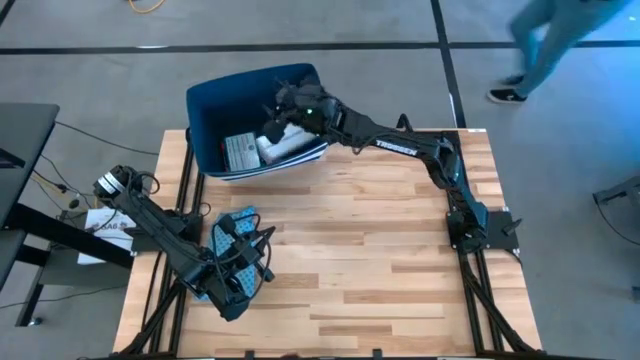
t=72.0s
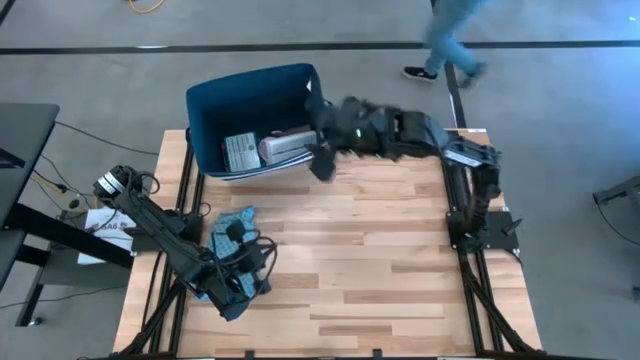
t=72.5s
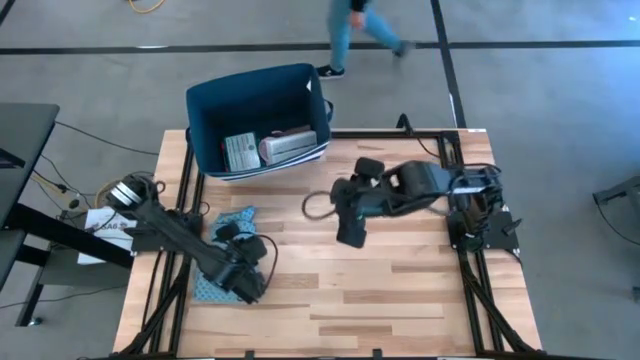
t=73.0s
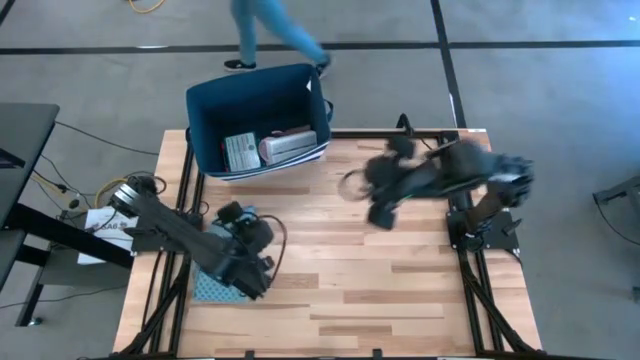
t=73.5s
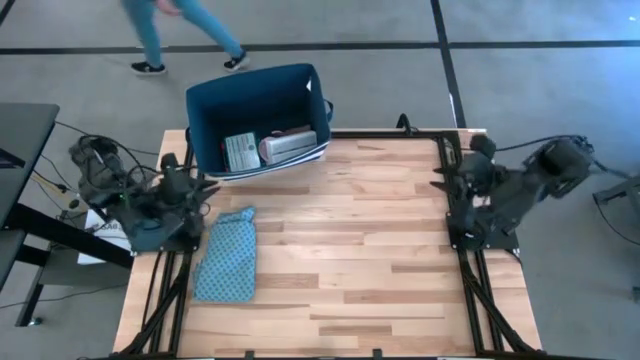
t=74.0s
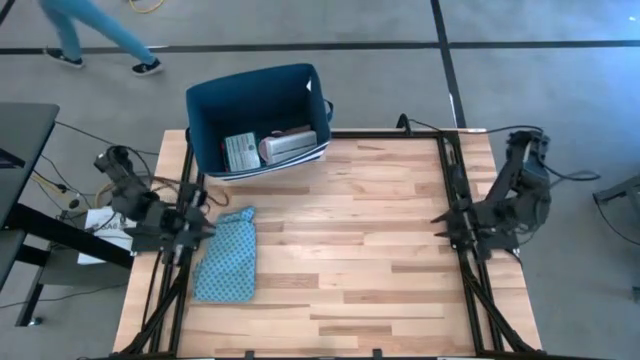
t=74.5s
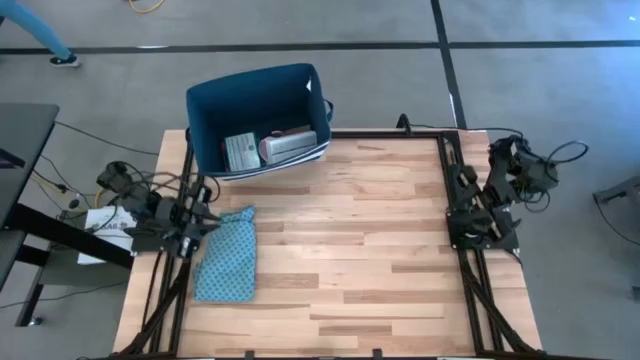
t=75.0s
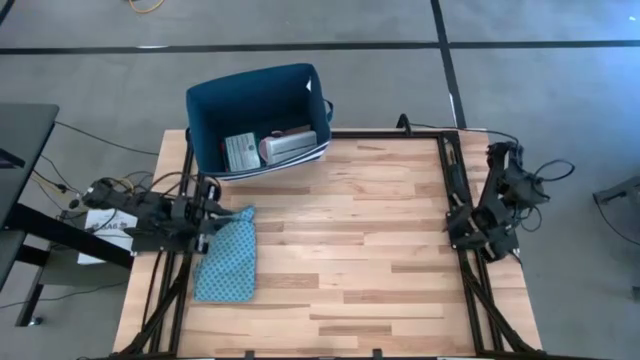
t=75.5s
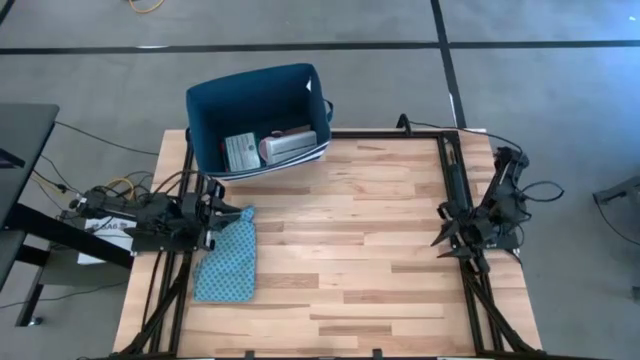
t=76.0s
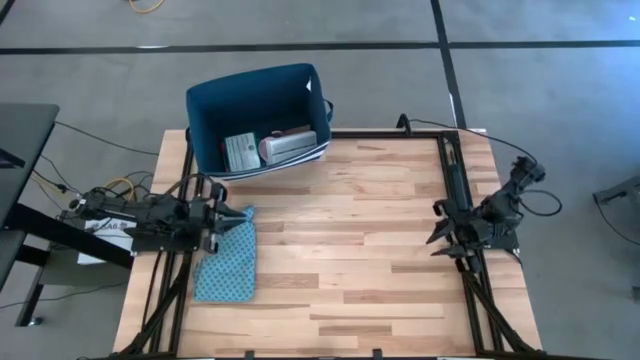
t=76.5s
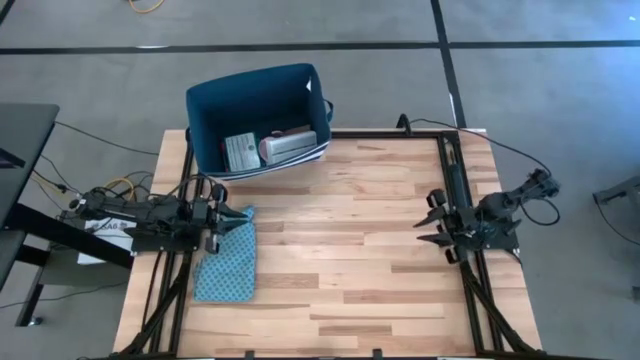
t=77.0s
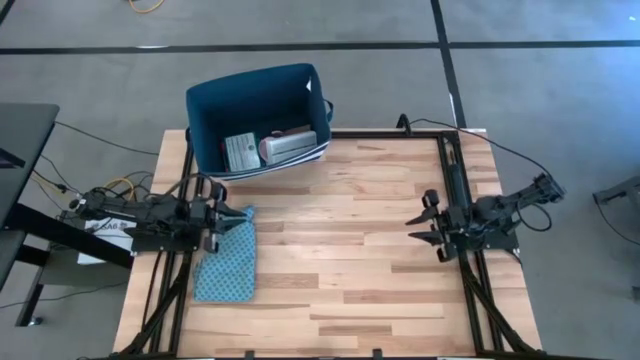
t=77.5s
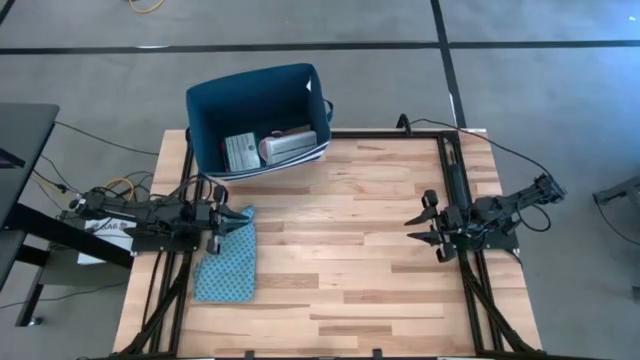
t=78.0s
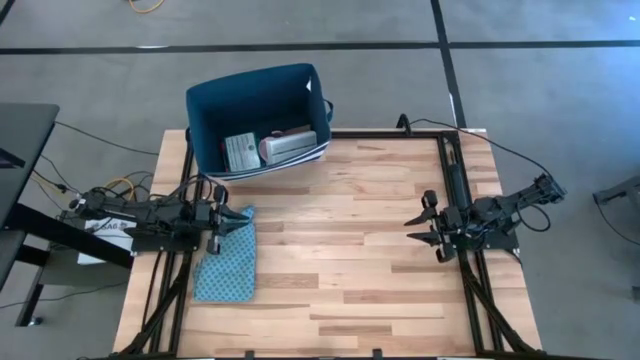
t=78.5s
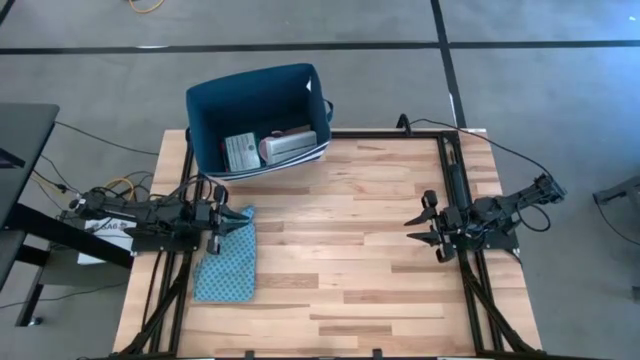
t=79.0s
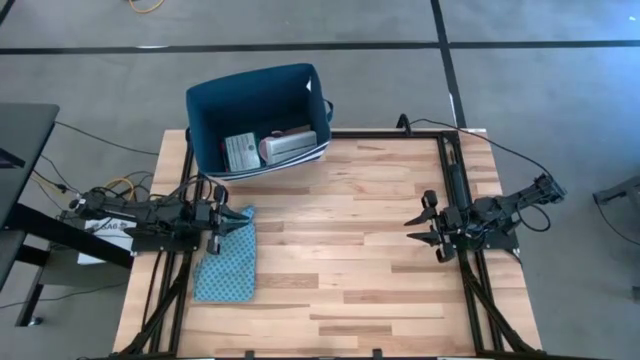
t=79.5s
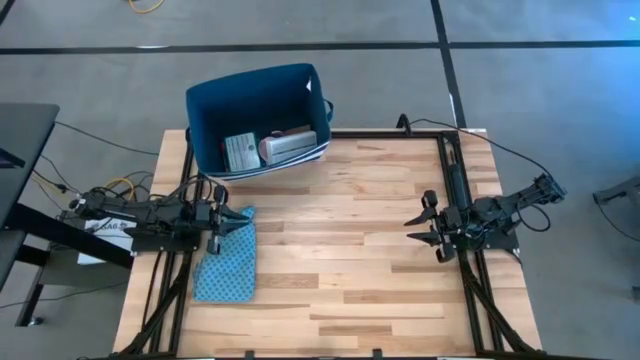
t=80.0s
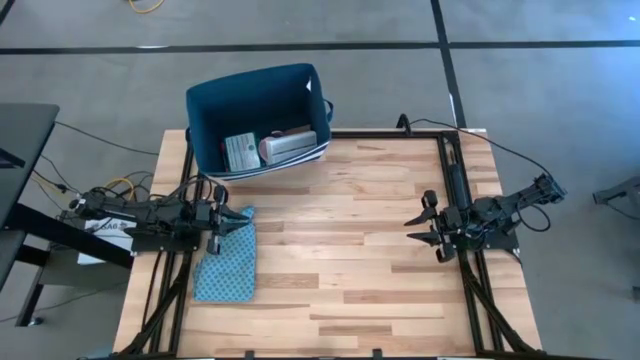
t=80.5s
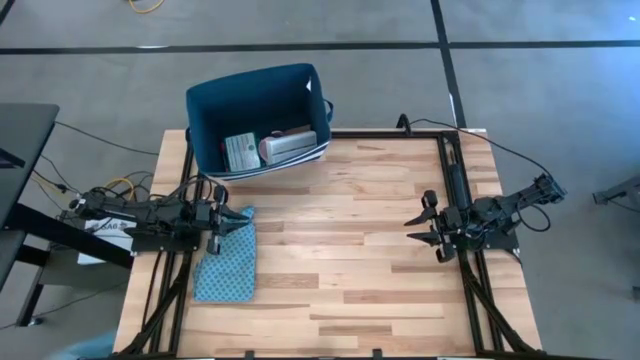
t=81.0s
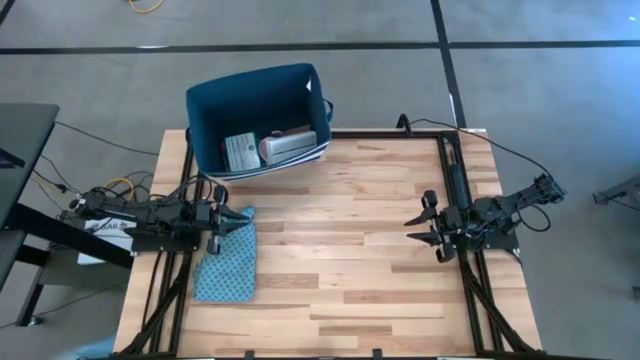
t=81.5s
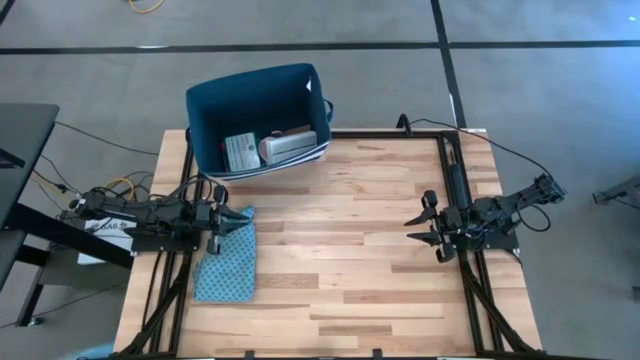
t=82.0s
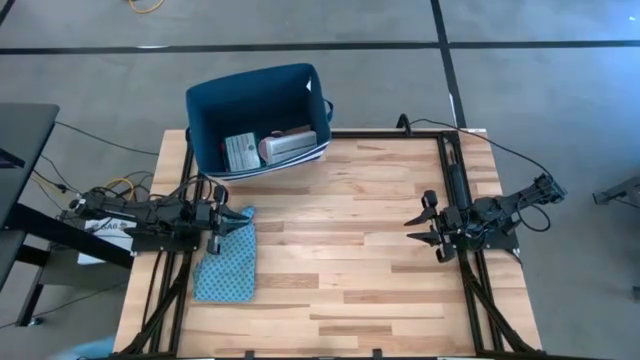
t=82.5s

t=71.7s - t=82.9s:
Task: Pick & place medical supplies in basket/bin
Return to Home Position

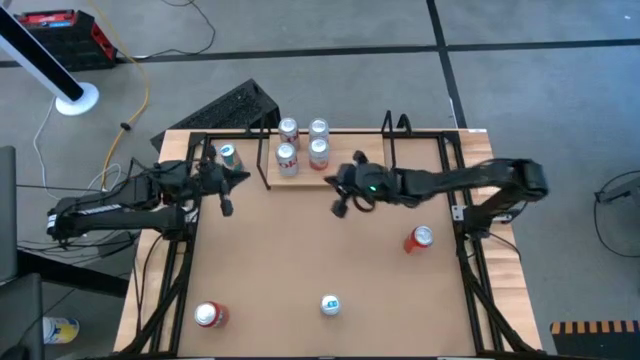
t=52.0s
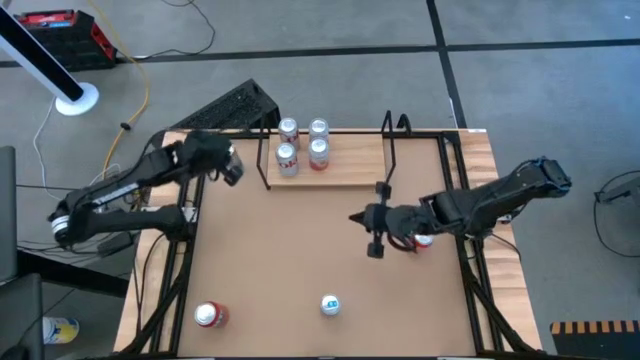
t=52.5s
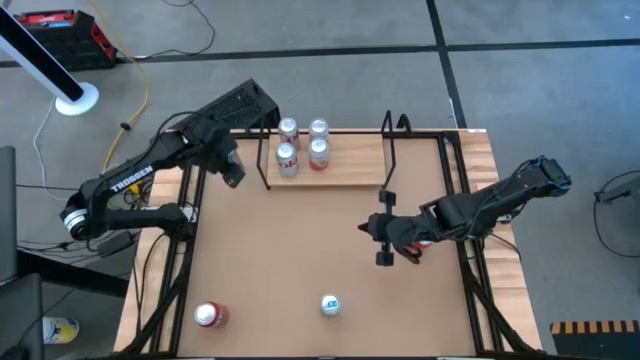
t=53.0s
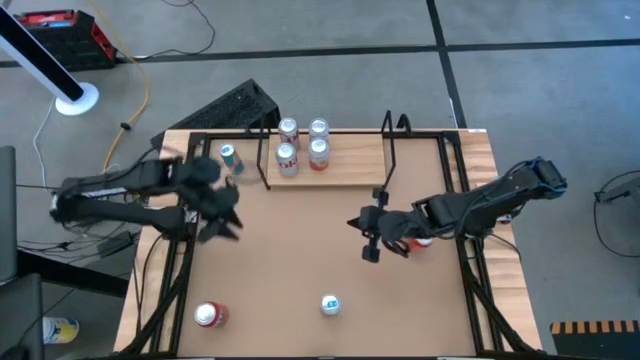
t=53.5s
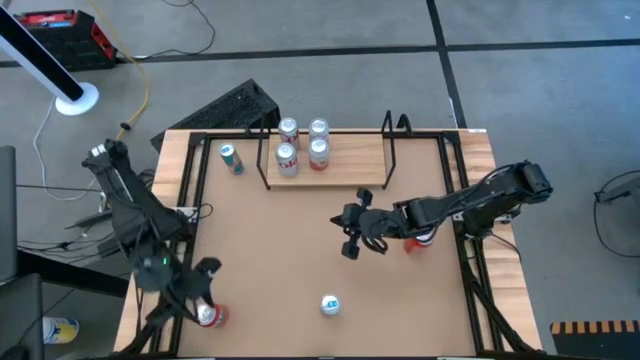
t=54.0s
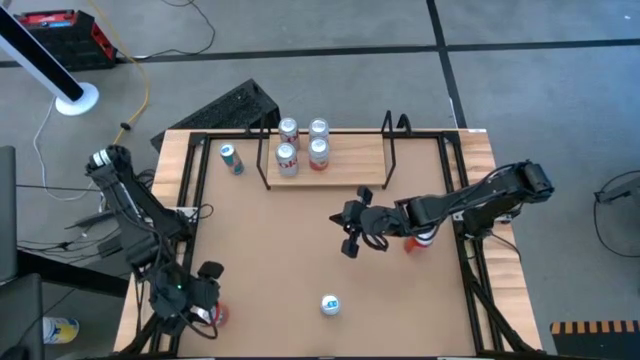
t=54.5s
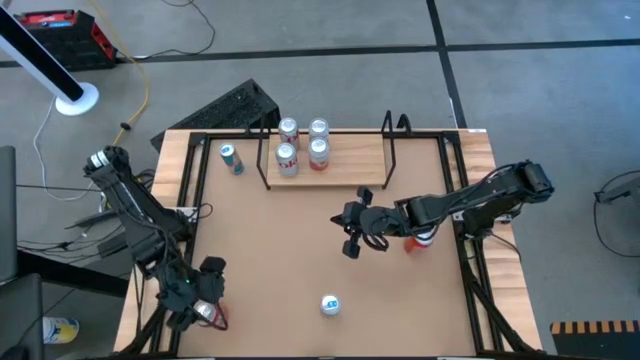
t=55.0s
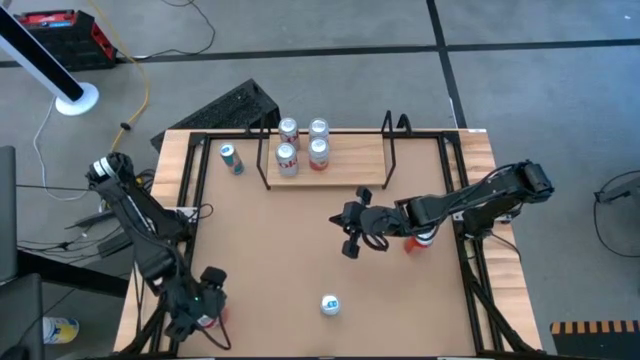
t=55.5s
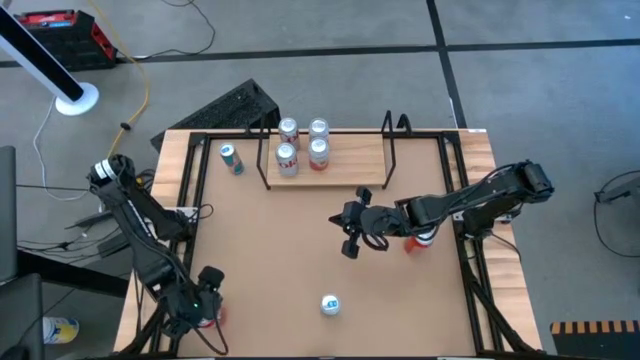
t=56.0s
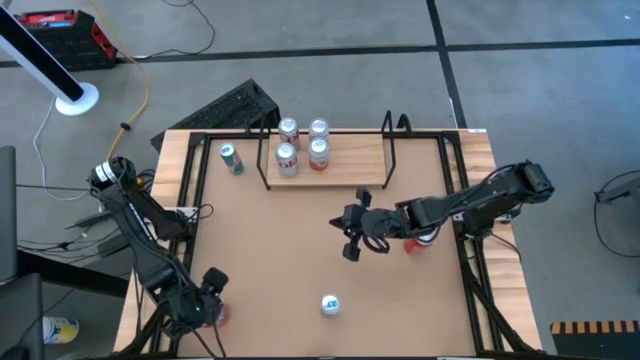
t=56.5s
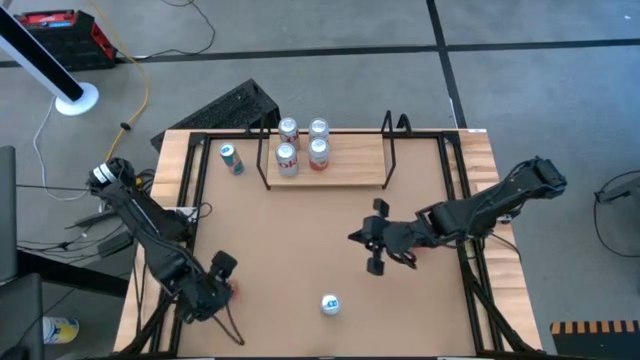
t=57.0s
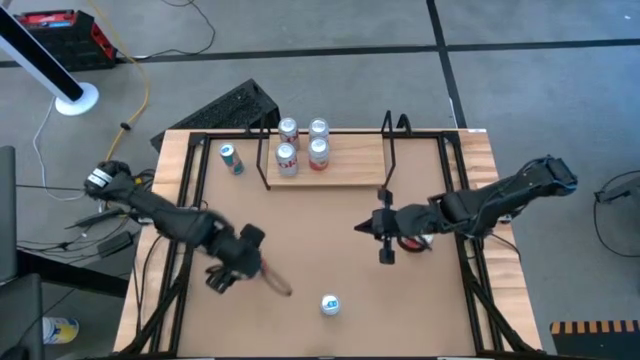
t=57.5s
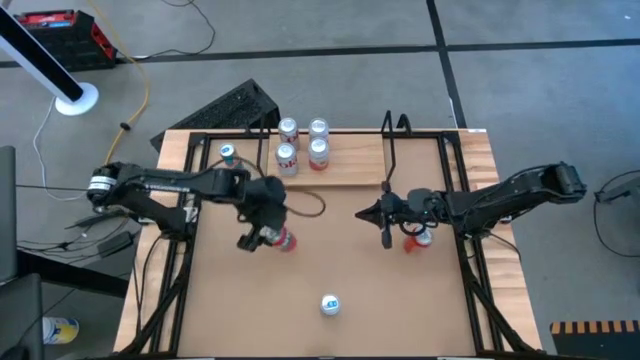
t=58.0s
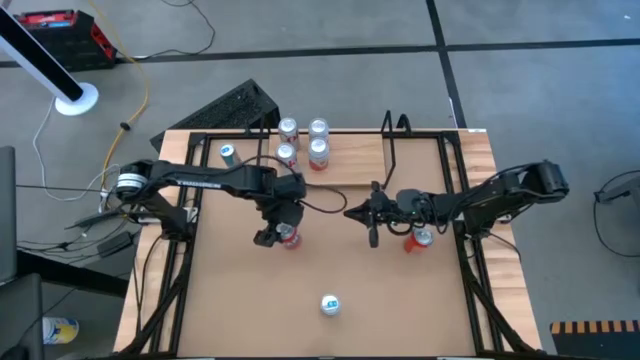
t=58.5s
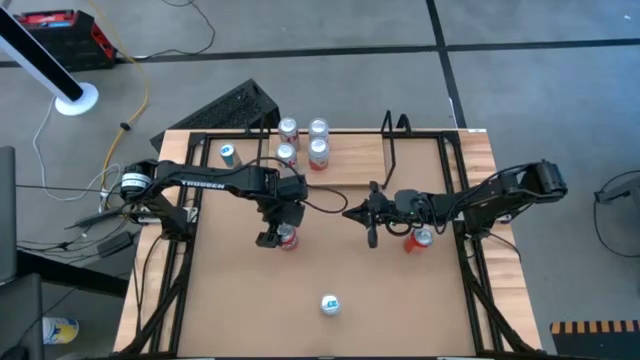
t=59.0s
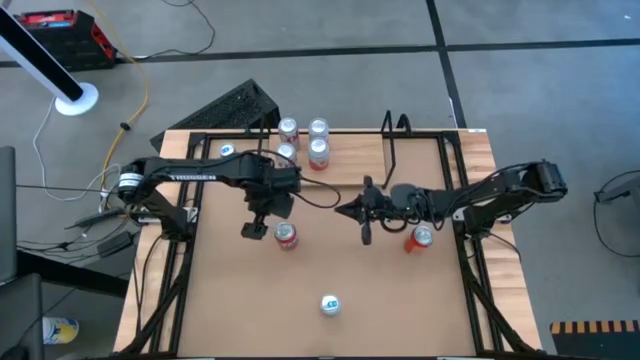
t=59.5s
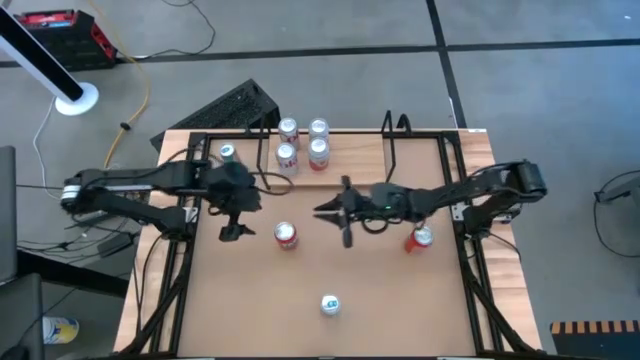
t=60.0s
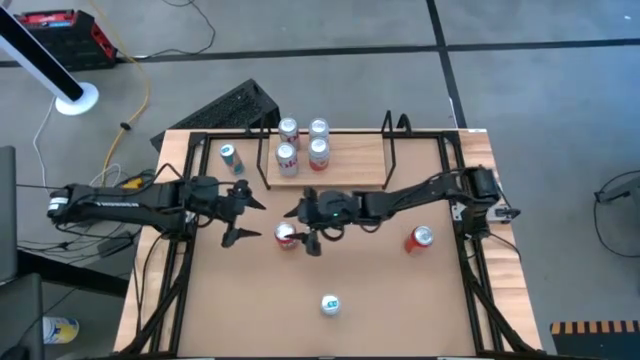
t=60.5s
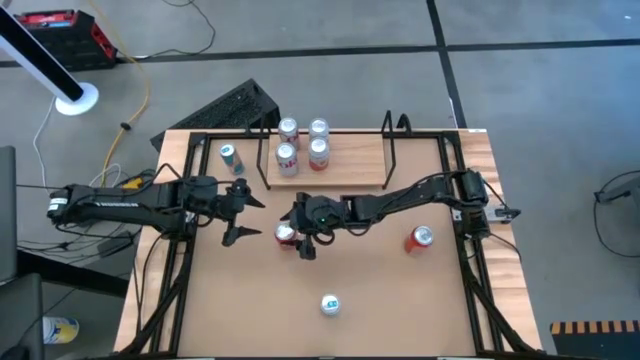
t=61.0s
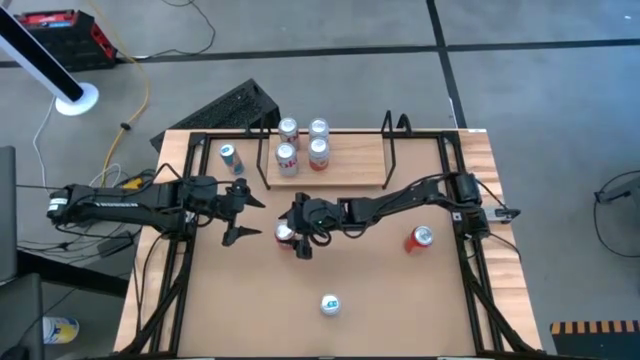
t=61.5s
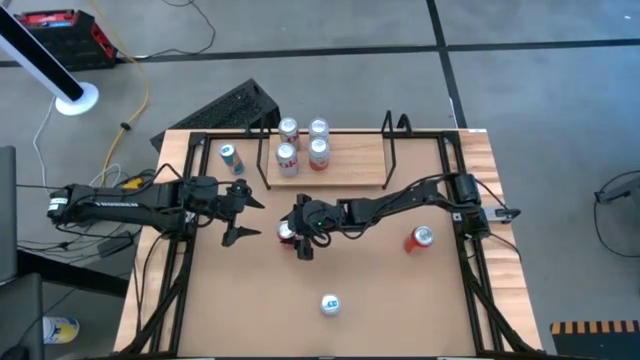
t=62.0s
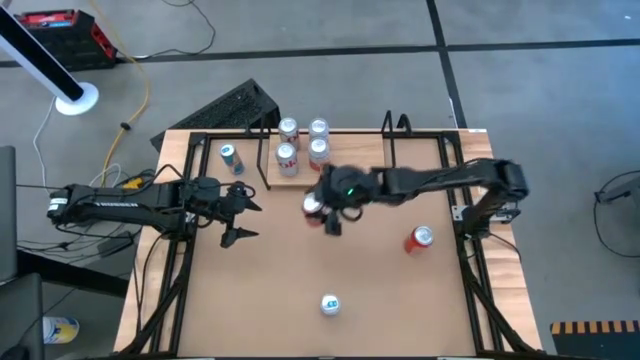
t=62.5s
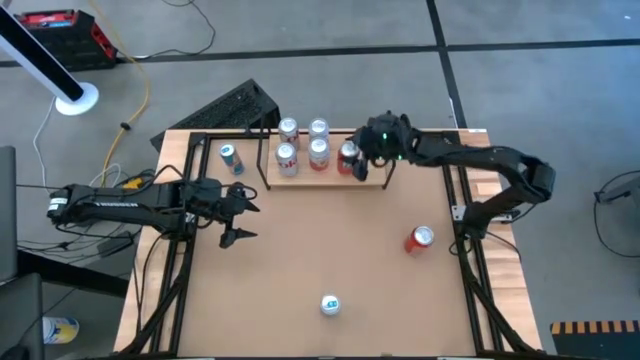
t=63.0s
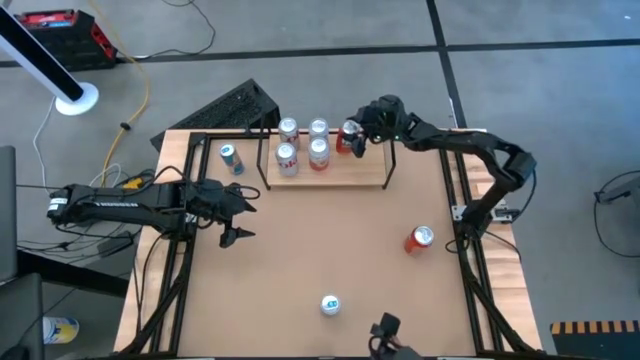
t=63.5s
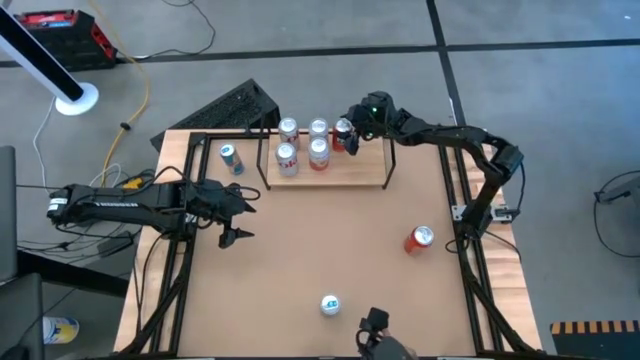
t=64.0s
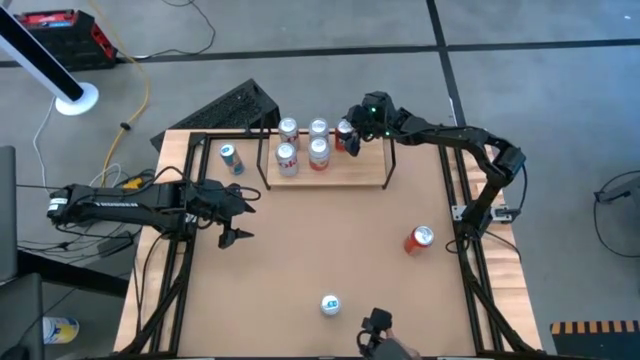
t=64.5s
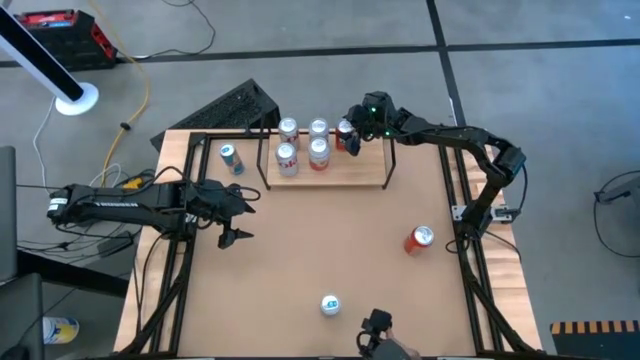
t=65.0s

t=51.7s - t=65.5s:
Task: Place canned beverage on shelf
Put the left orange soda can on the shelf
